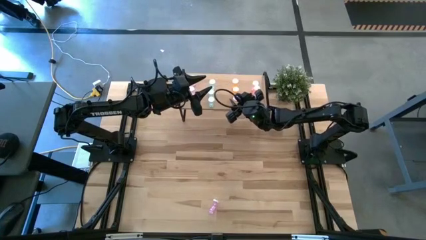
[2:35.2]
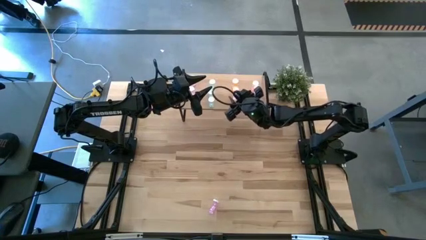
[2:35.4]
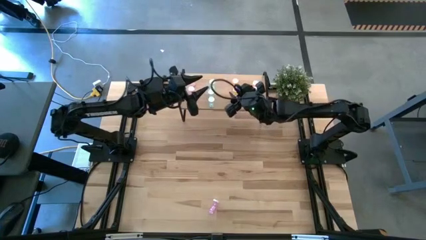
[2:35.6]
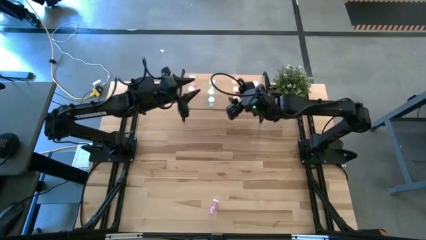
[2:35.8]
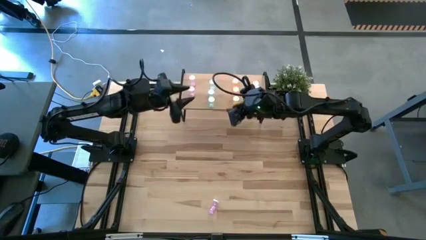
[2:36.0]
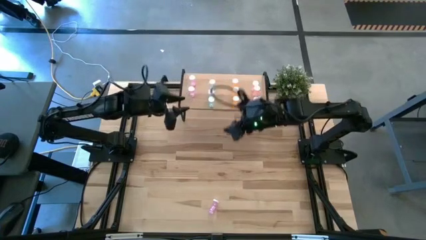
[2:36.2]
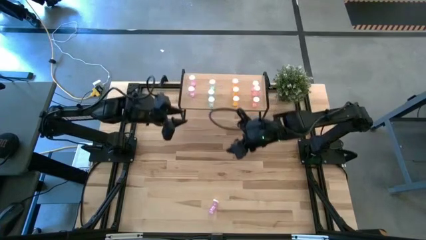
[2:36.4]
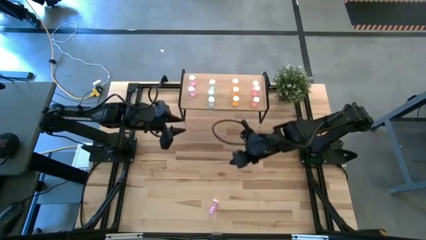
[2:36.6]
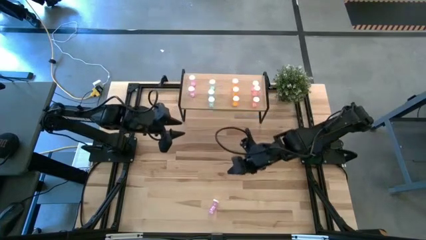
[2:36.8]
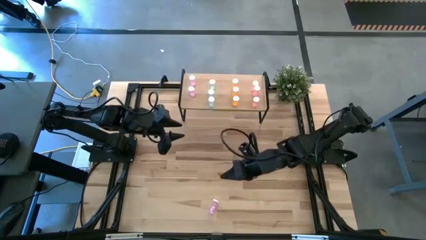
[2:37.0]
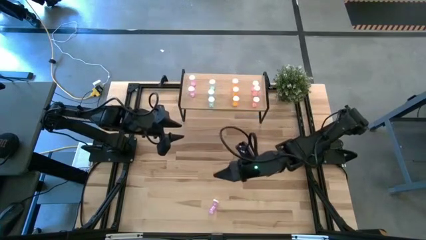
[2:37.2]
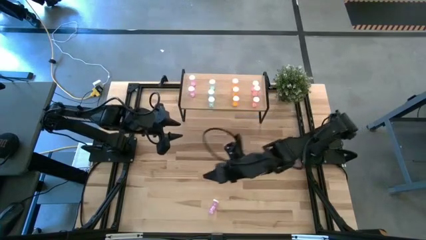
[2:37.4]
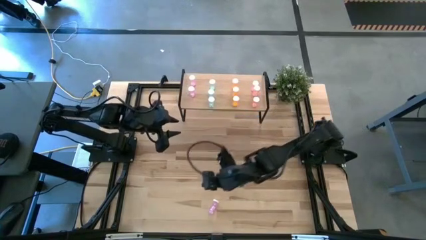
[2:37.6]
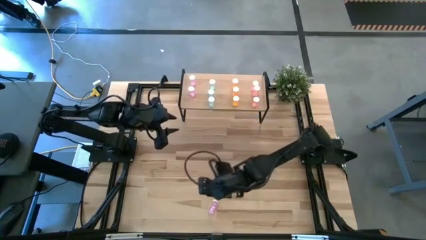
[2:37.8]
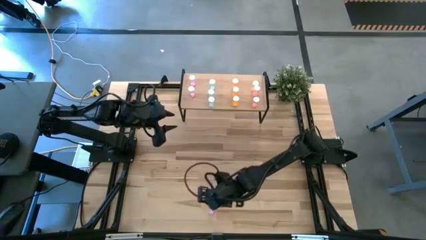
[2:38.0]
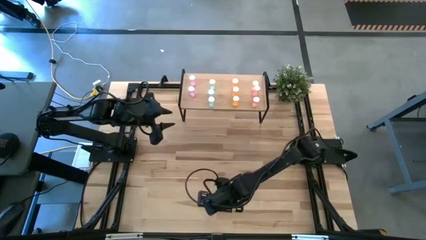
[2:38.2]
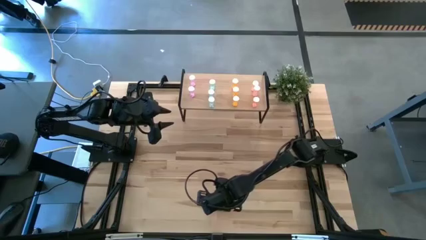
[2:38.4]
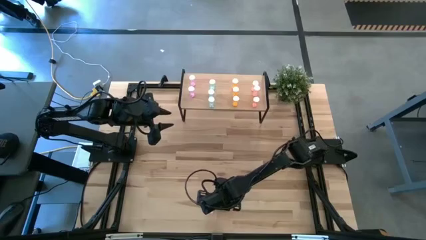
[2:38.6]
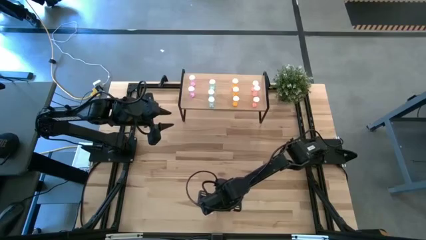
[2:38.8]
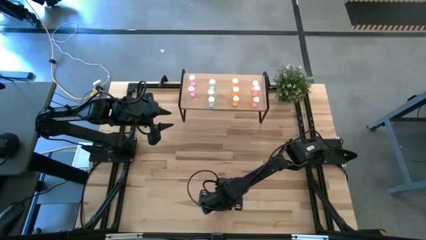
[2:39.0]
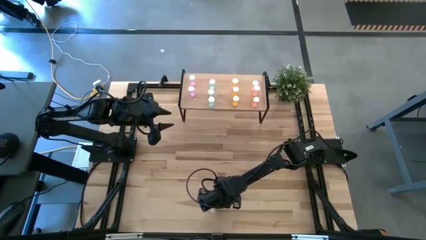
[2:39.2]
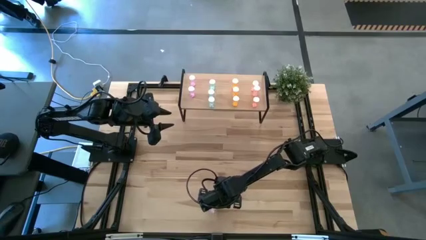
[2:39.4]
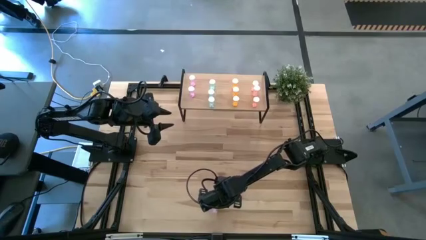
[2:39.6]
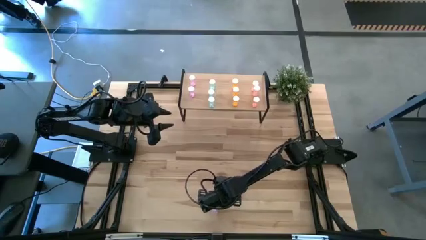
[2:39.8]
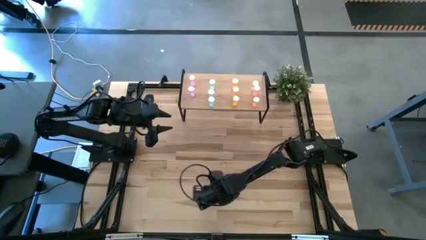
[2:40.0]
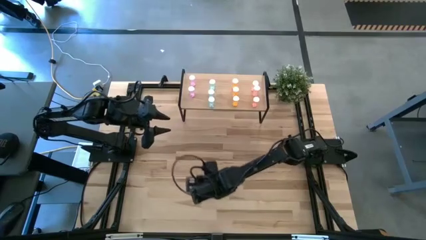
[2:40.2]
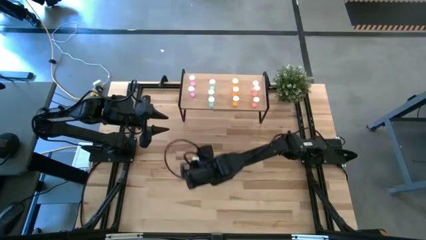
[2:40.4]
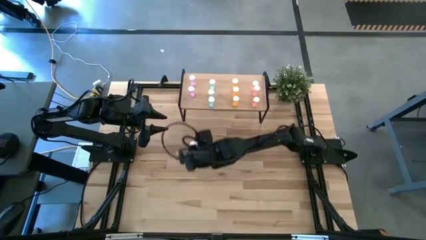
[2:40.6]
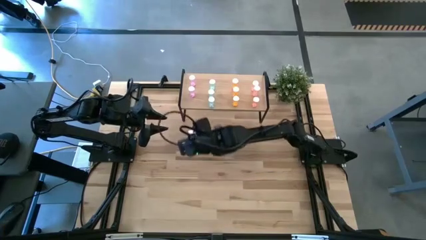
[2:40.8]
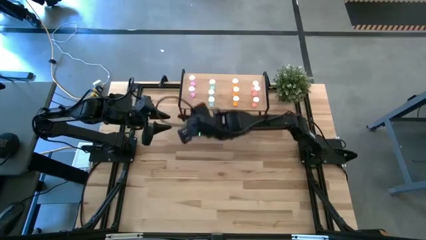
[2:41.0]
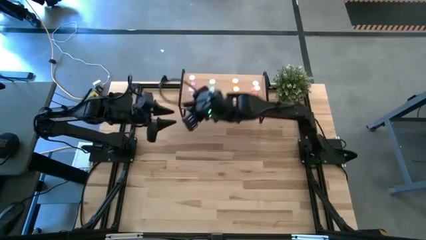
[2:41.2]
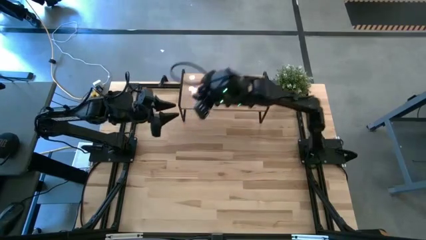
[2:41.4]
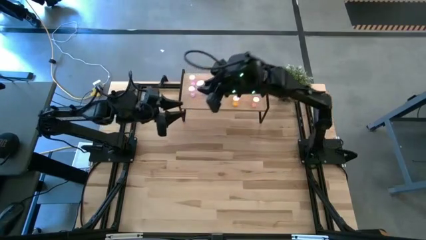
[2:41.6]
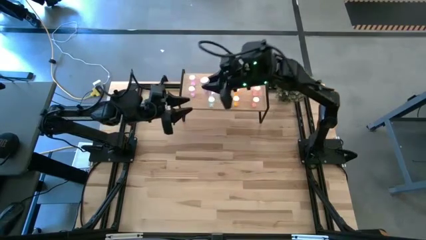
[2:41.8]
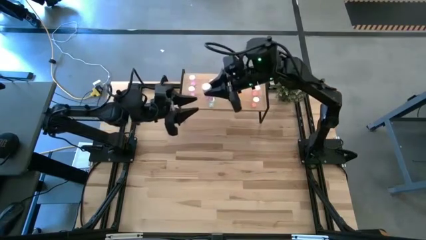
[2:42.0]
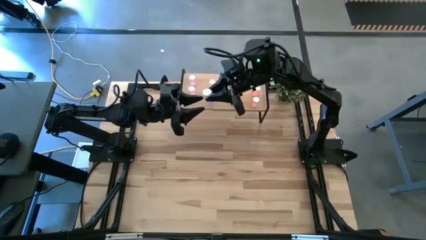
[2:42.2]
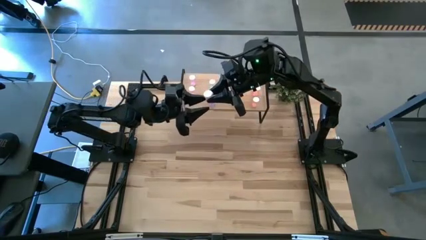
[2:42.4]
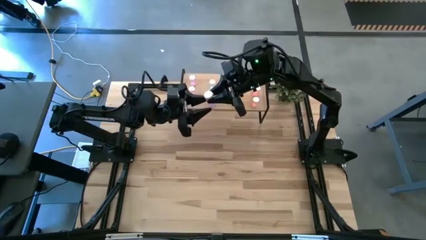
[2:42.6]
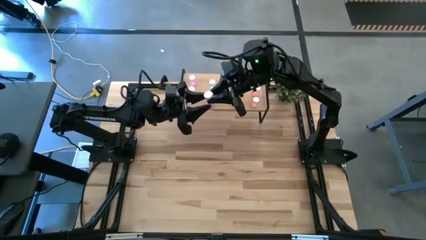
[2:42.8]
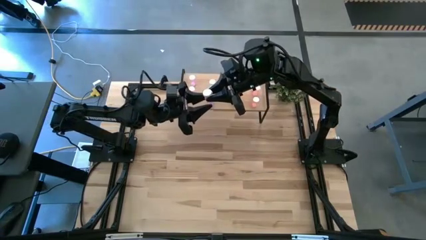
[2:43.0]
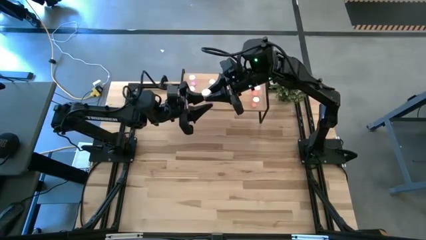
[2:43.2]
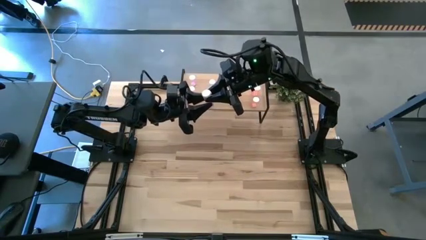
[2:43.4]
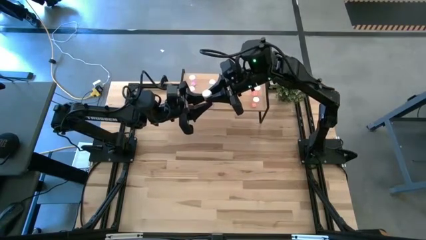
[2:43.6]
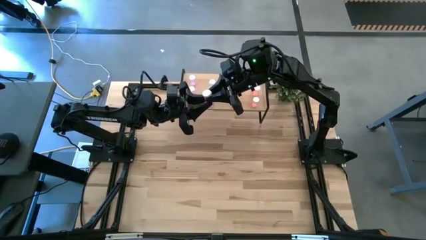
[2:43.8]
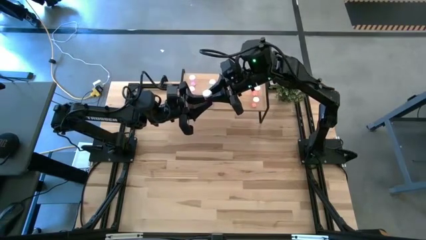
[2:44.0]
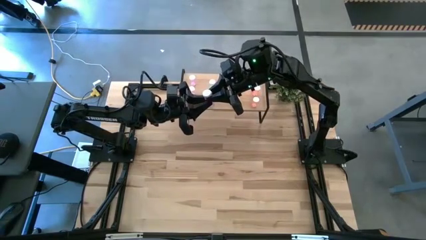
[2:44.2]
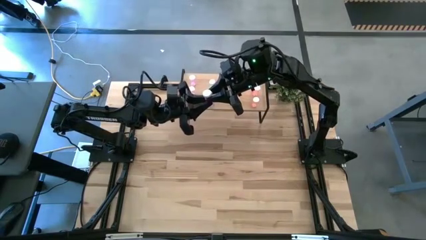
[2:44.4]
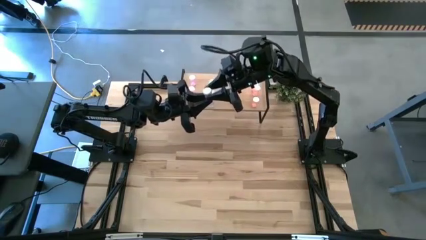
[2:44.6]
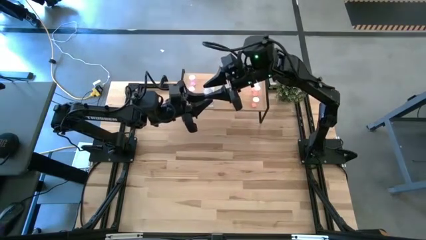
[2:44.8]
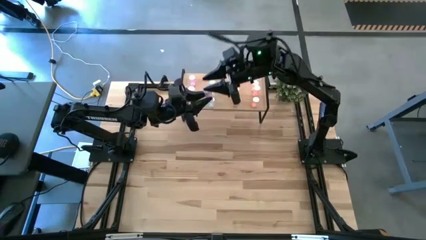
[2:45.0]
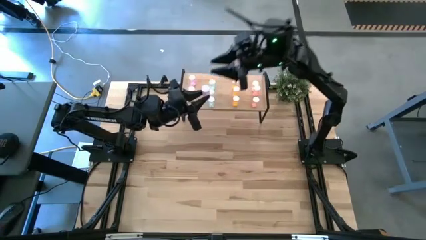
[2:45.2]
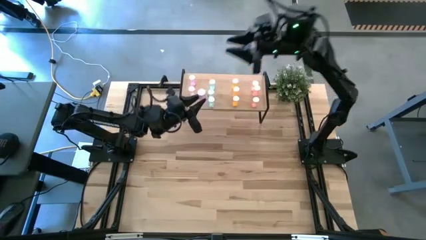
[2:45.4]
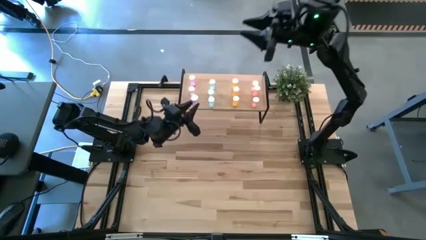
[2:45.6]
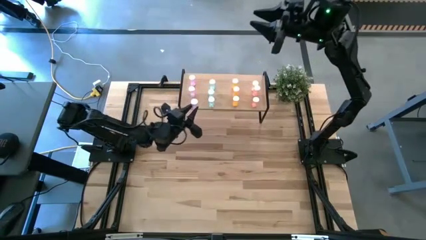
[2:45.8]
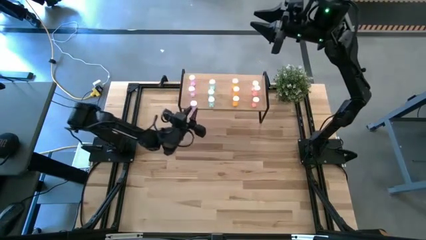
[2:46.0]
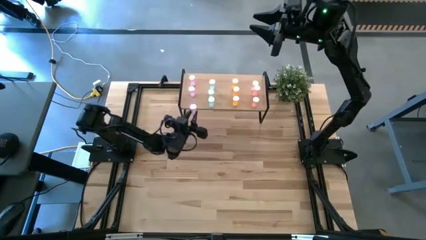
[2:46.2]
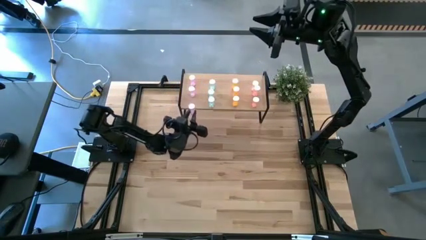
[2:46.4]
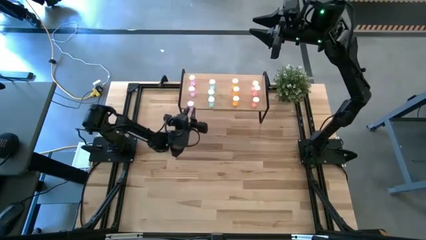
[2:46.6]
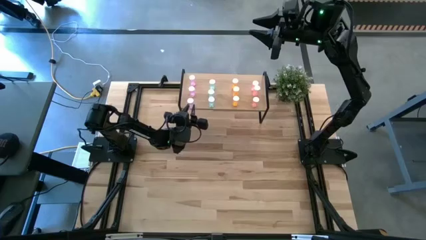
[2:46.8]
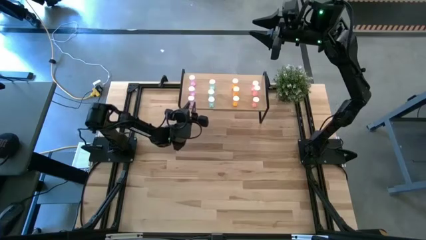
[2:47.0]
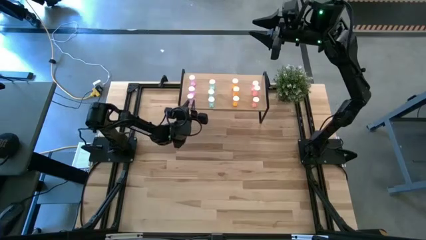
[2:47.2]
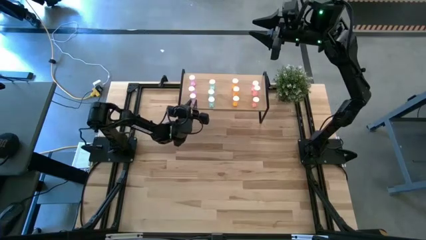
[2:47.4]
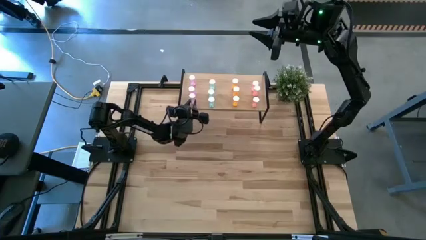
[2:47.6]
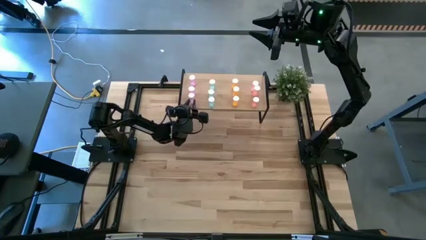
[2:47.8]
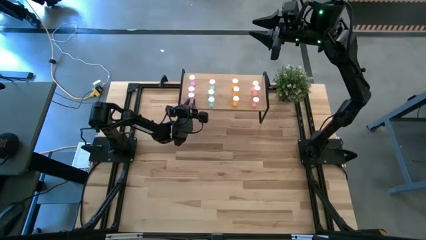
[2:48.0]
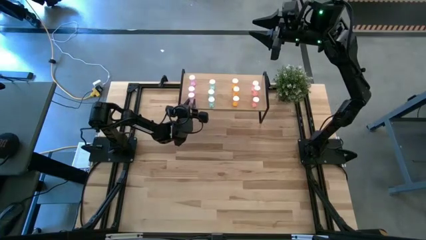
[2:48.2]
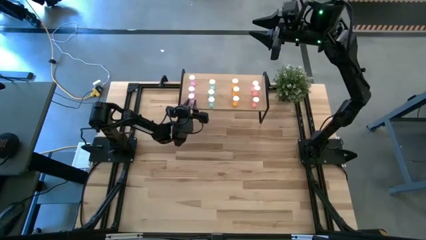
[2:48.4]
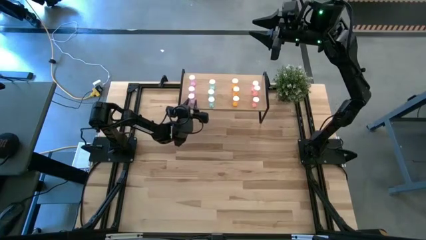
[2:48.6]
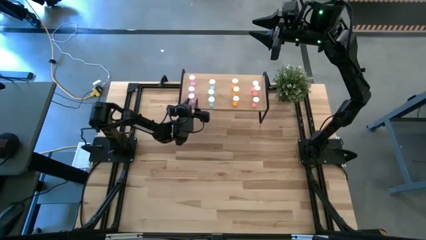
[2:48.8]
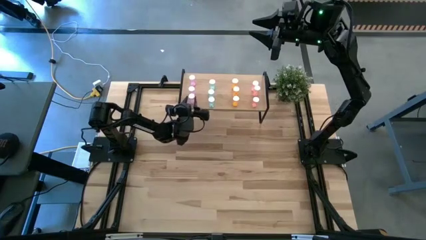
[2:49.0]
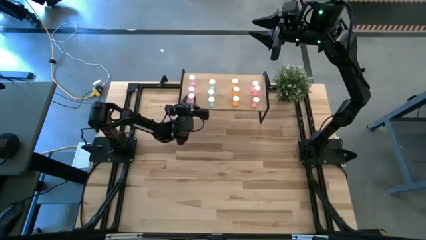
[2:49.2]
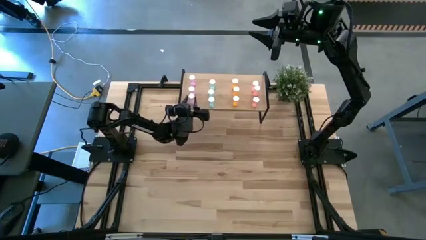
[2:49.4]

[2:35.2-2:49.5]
Task: Pick and place medicine bottles onto shelf by color
Put the violet pill bottle on the shelf aligned with the other violet pill bottles

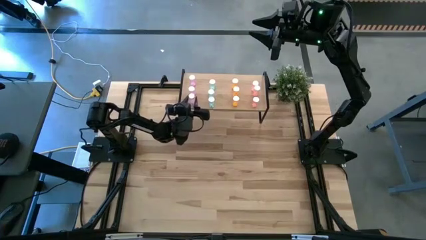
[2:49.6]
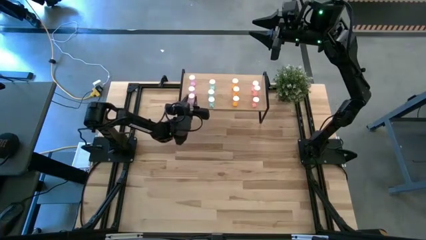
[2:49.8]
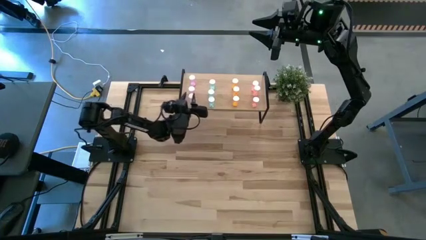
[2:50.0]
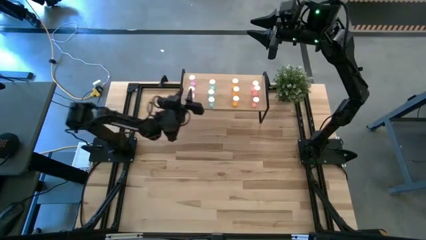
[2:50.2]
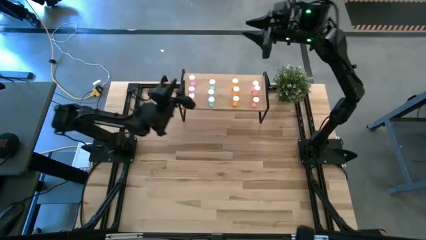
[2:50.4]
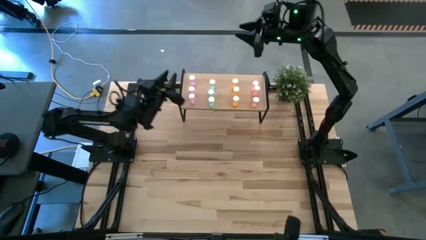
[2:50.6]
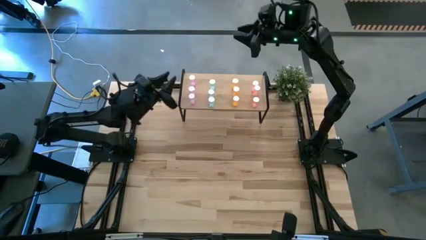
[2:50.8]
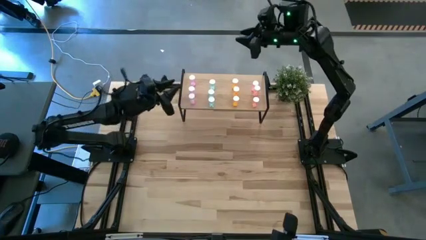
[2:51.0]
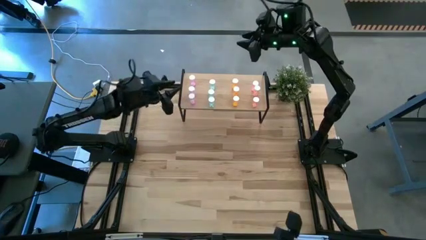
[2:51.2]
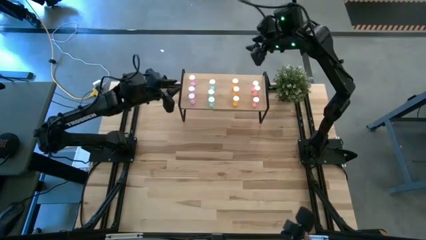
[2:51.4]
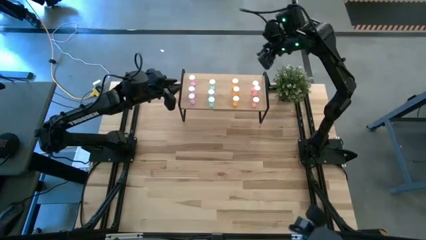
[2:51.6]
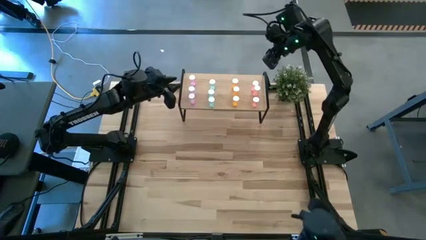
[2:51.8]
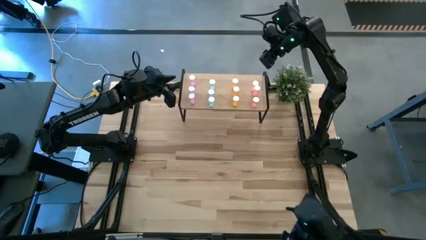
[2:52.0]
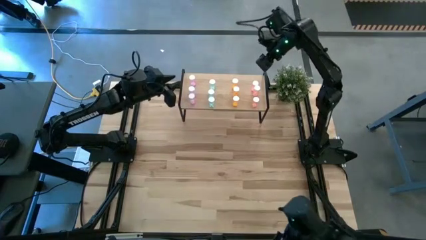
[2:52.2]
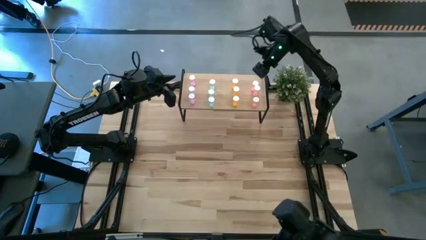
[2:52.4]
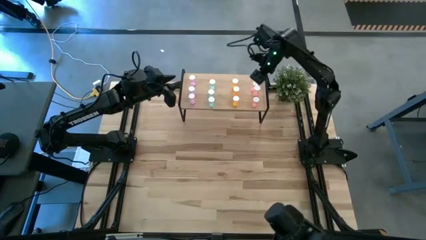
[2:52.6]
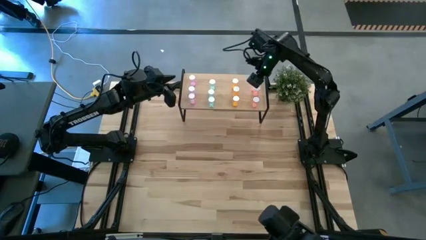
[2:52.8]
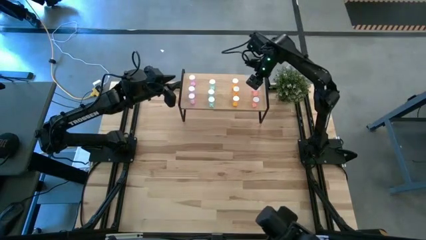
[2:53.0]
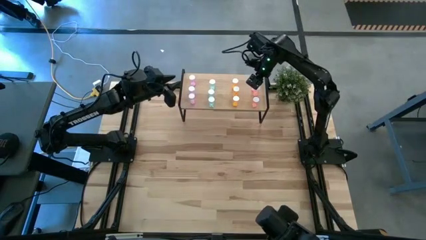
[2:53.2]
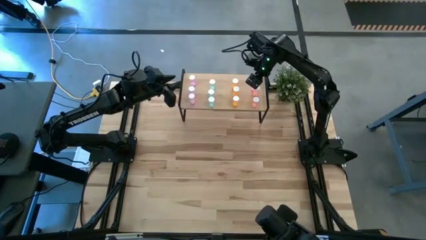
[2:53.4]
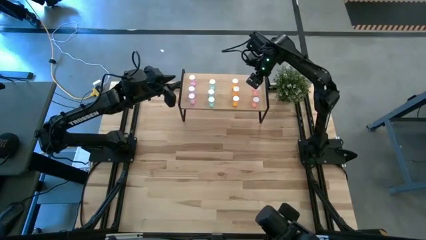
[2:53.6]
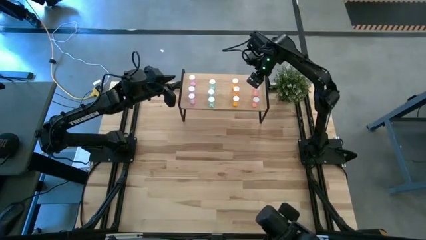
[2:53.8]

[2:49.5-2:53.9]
Adjust the top pink pill bottle
